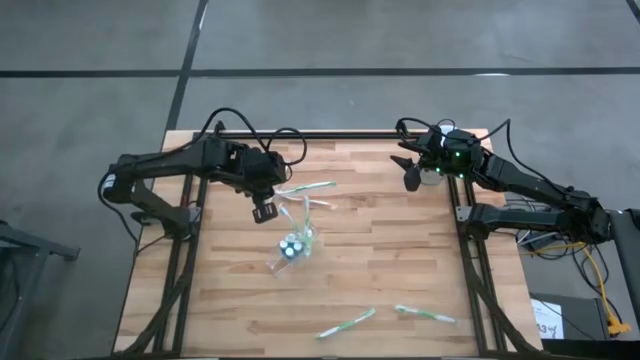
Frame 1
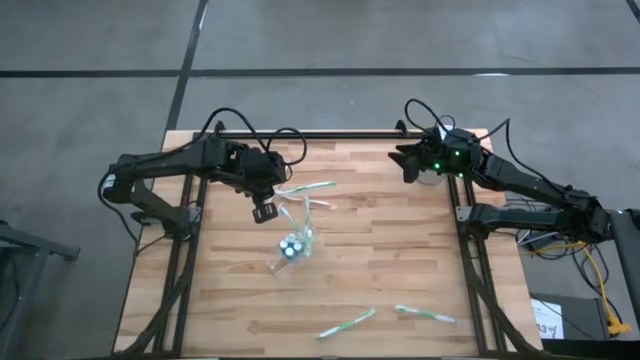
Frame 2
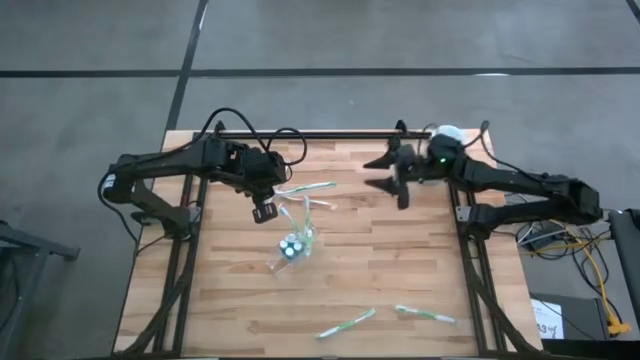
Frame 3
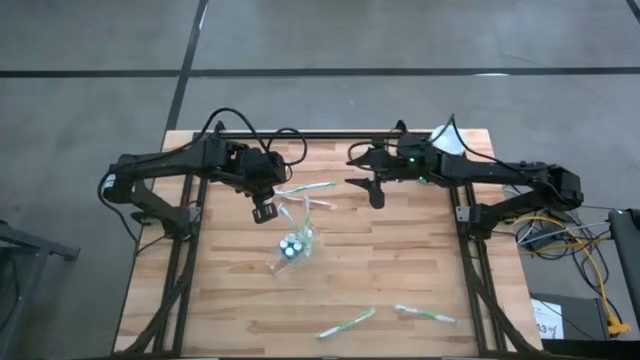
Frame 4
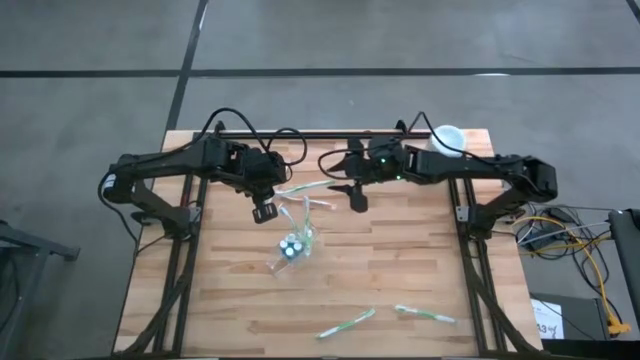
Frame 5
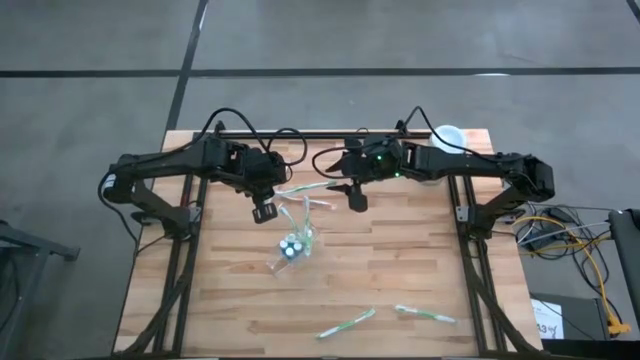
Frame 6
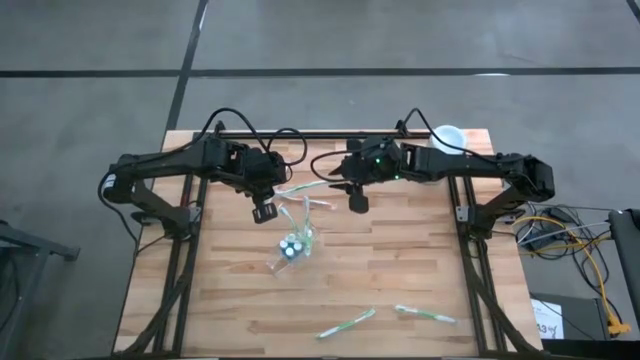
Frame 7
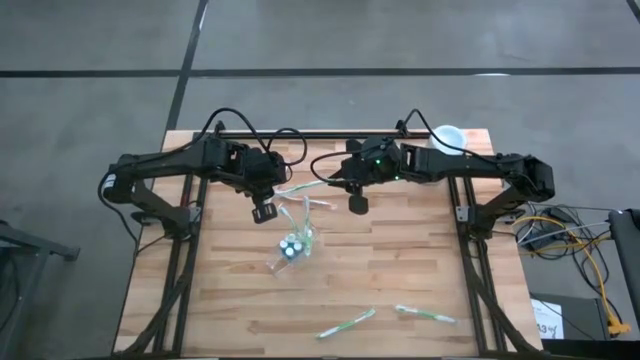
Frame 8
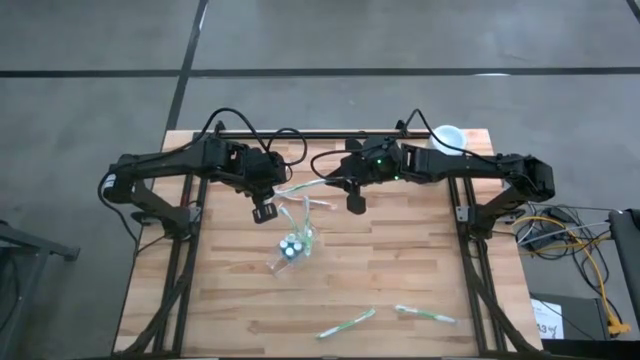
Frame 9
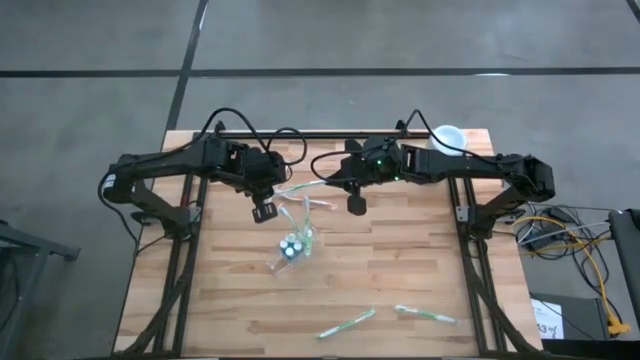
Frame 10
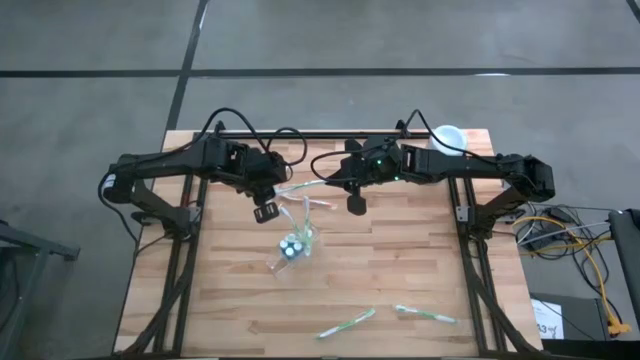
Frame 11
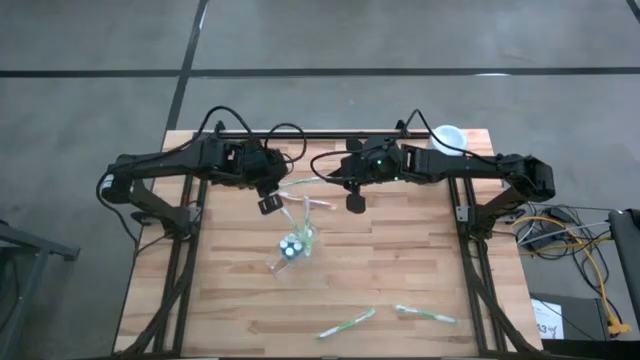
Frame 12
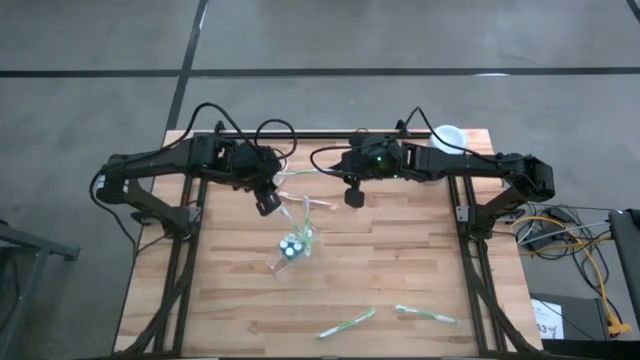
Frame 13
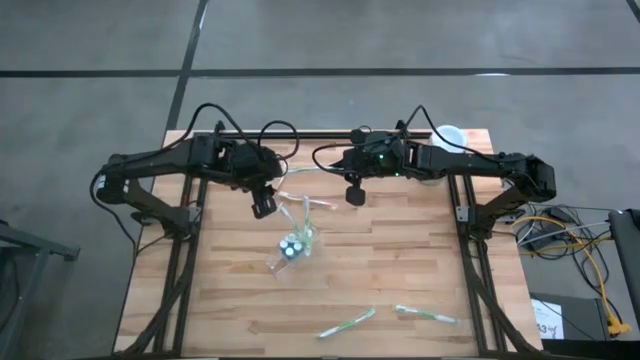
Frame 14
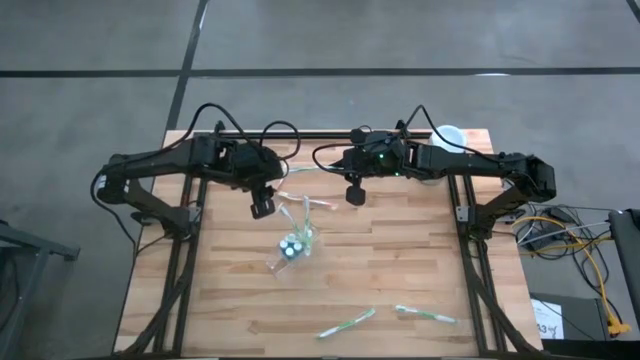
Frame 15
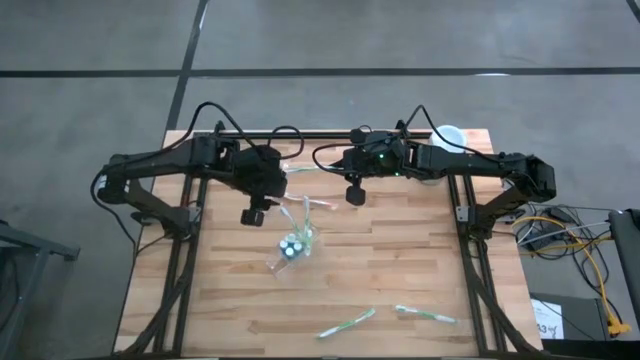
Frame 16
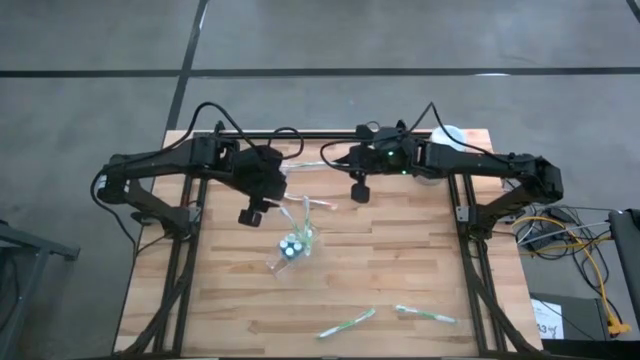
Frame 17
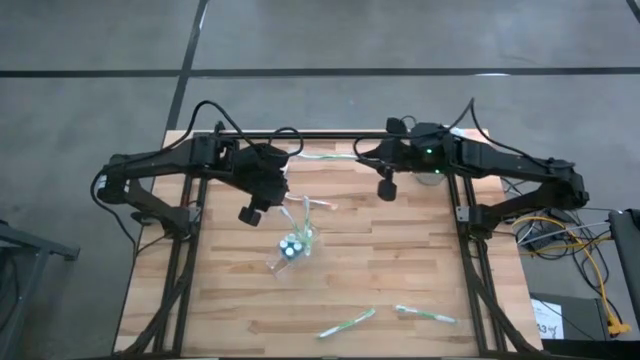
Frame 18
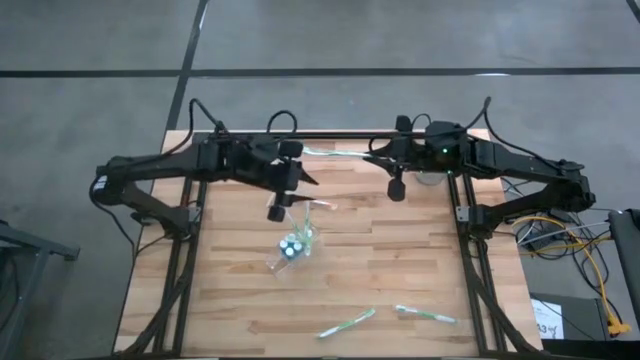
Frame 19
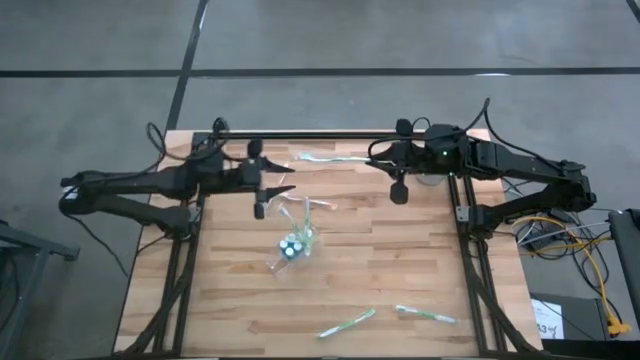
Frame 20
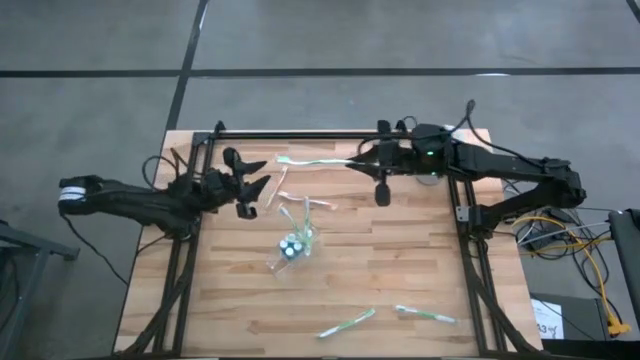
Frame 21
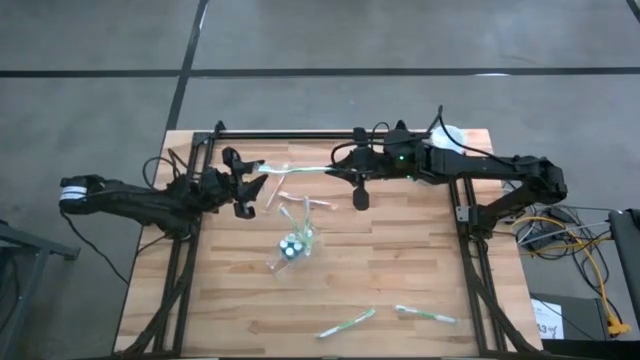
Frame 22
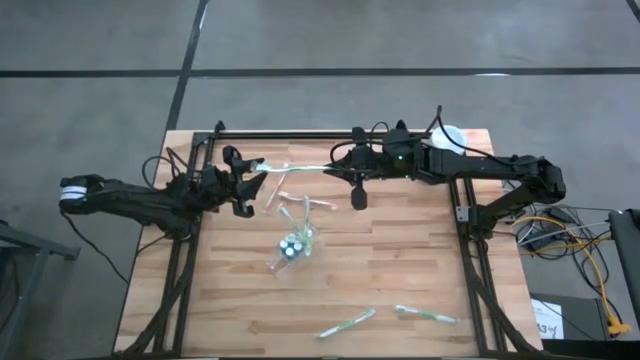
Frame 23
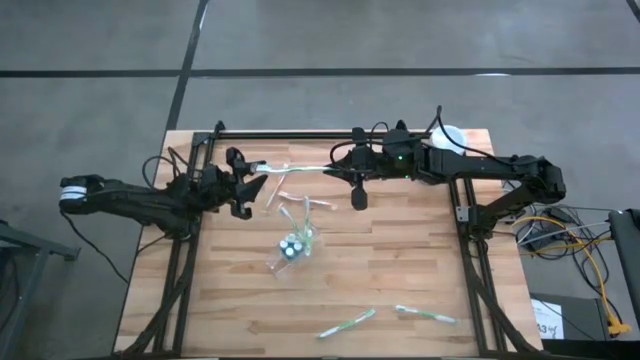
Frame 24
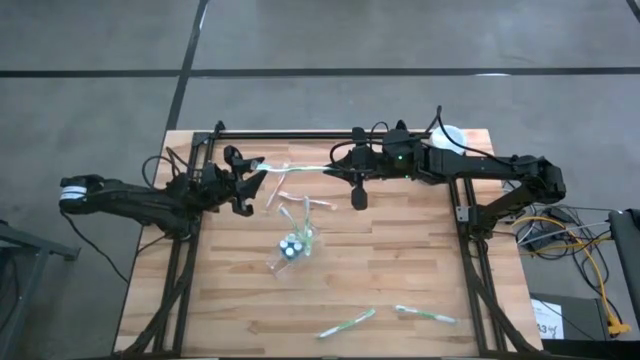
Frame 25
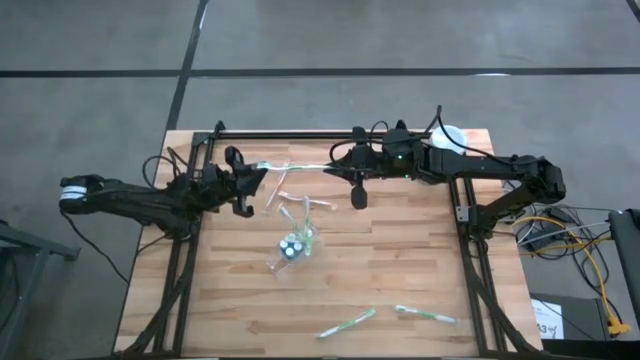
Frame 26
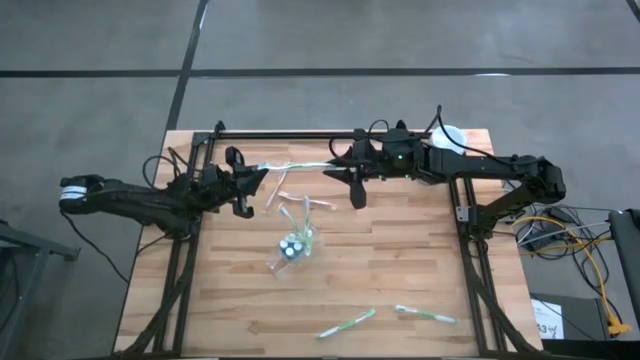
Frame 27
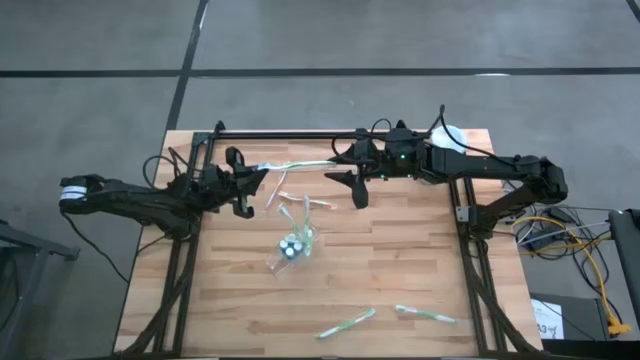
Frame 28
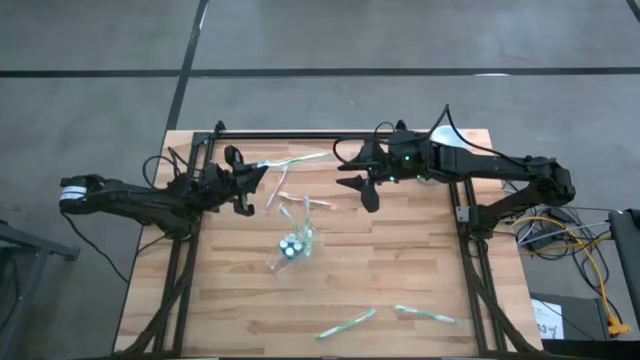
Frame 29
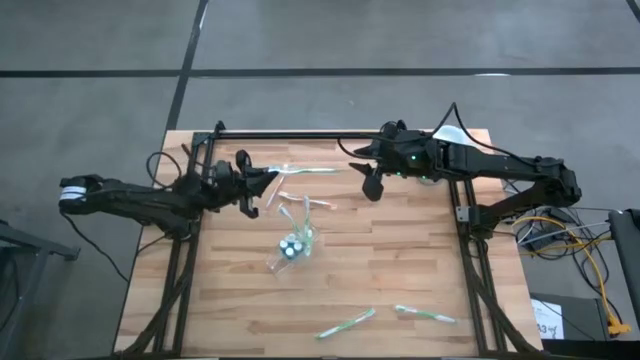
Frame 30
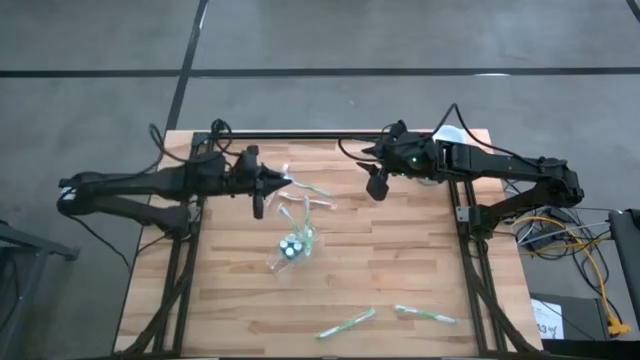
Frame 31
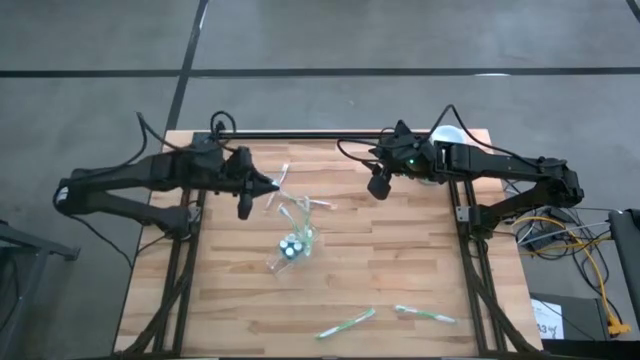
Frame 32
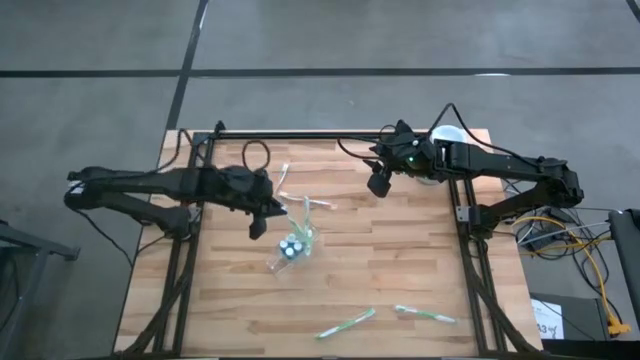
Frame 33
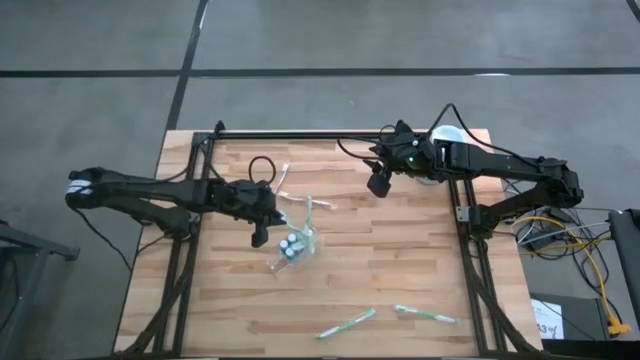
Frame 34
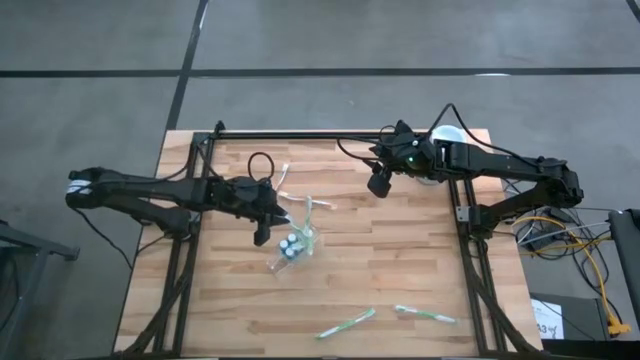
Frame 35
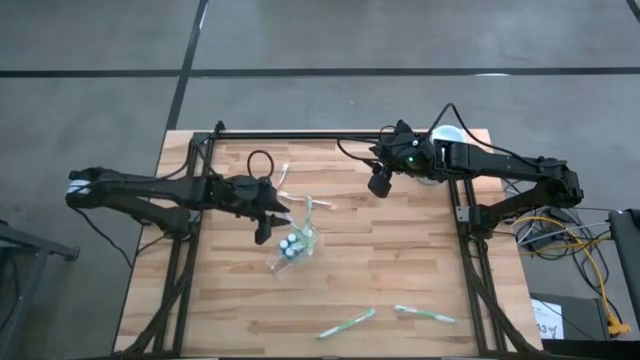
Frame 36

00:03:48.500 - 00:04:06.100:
Task: Pick & Place toothbrushing station
Put the green toothbrush into the transparent organizer

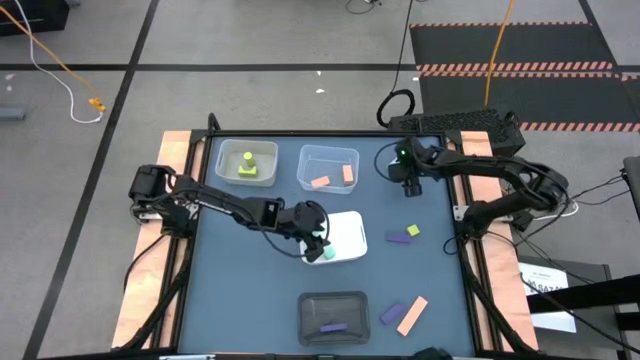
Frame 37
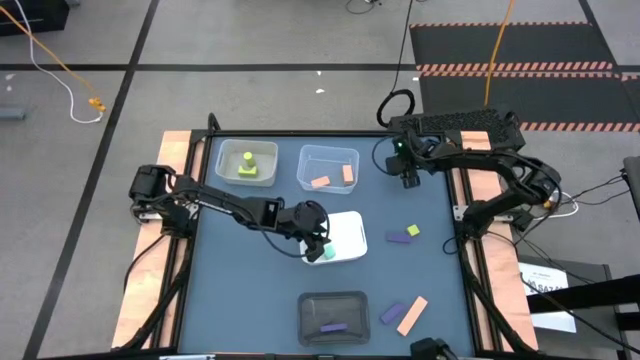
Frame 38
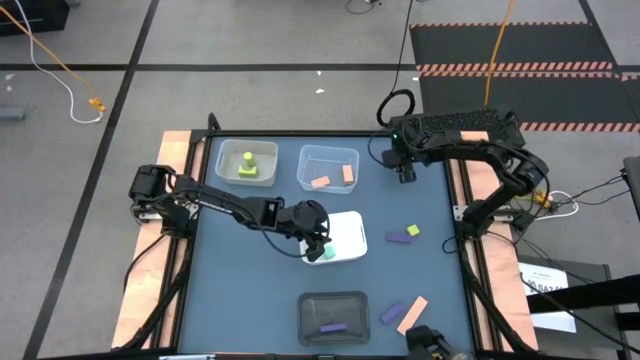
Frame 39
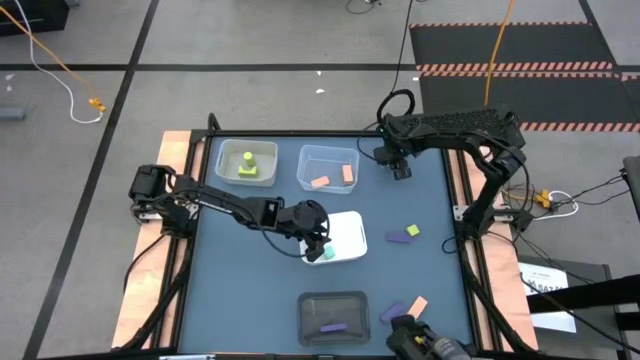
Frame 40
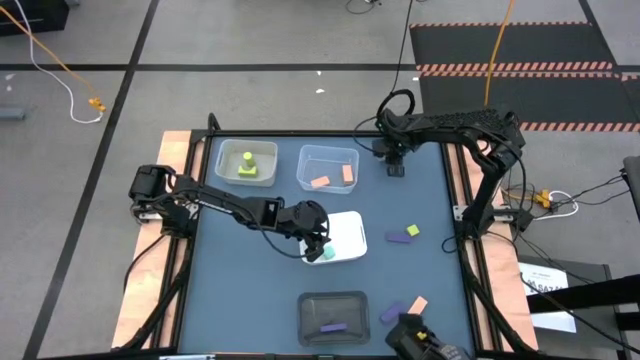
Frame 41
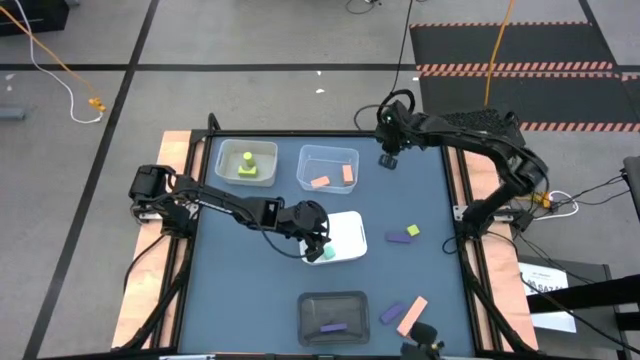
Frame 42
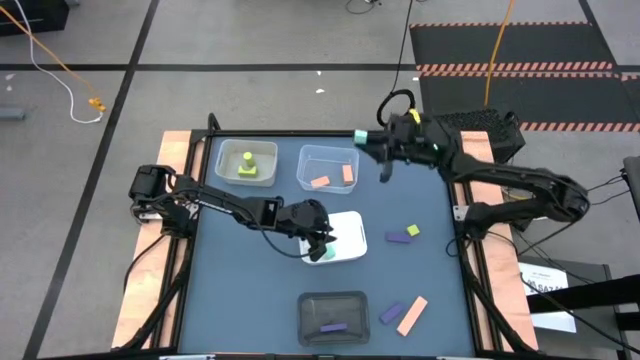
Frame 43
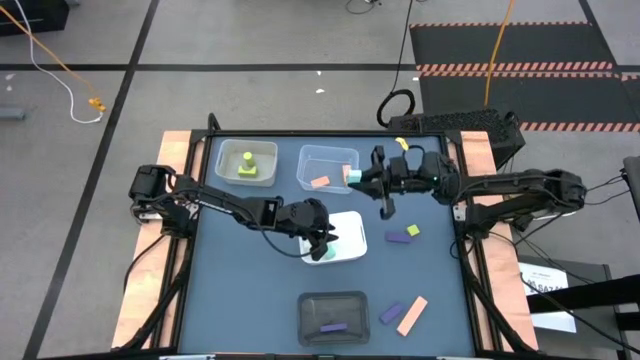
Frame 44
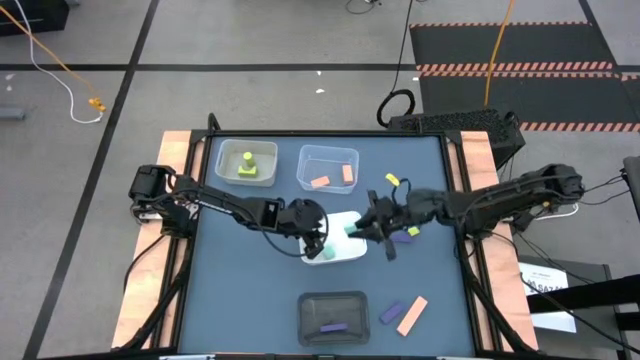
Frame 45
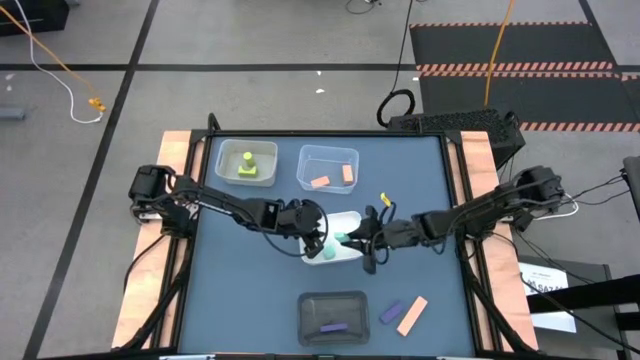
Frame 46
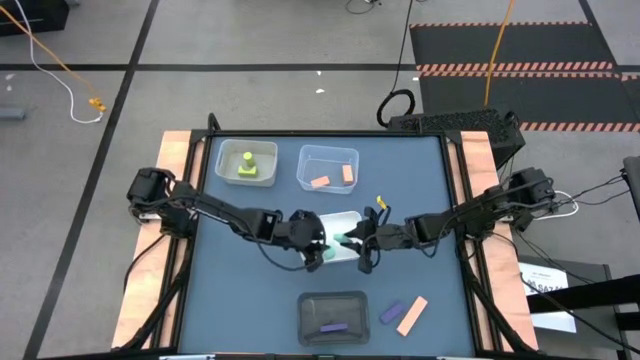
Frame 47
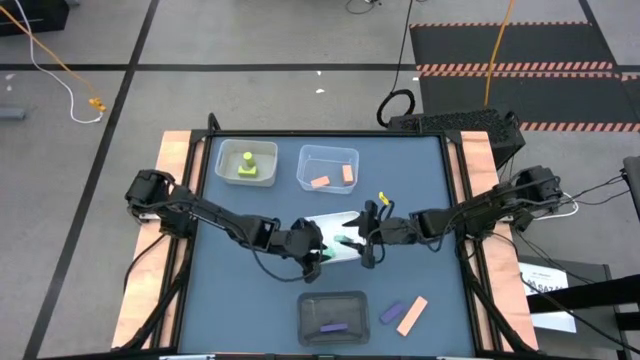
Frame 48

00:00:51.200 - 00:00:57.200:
Task: Sort & place blocks by color
Put the light blue block into the white bin
